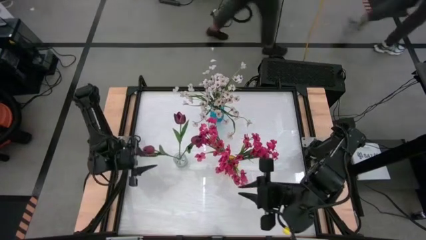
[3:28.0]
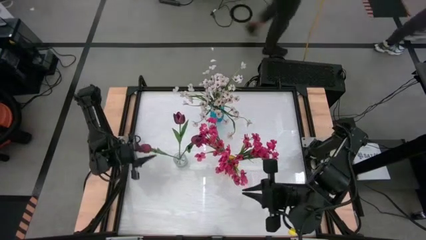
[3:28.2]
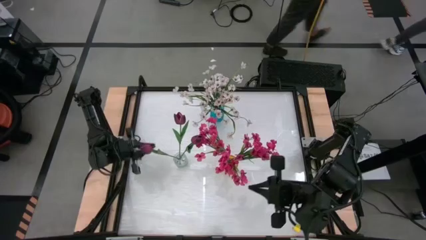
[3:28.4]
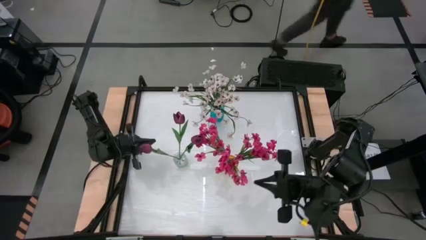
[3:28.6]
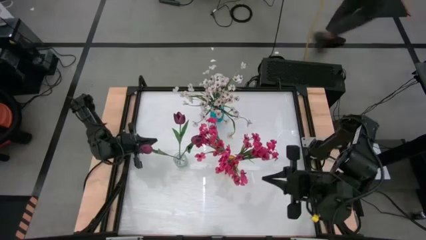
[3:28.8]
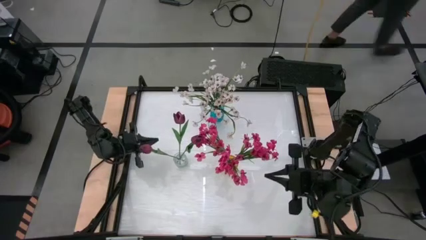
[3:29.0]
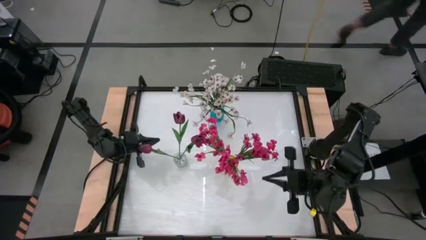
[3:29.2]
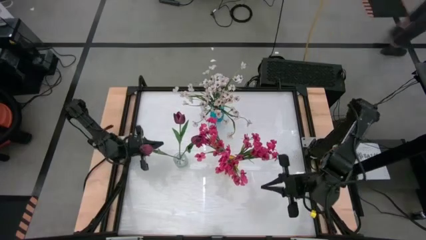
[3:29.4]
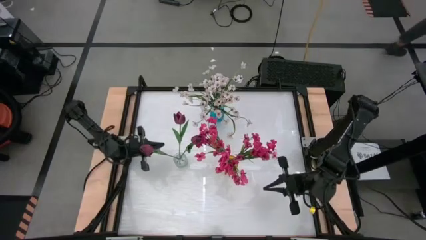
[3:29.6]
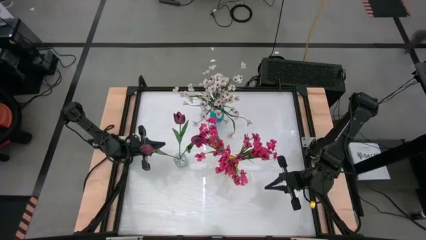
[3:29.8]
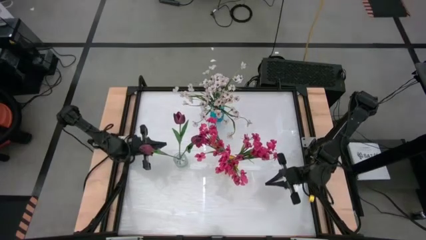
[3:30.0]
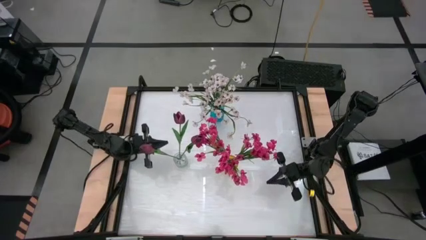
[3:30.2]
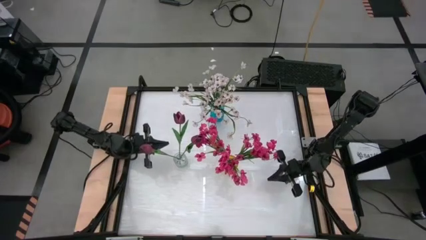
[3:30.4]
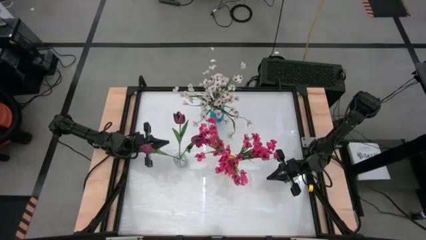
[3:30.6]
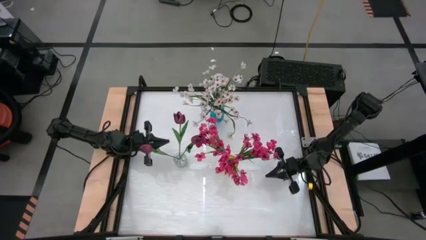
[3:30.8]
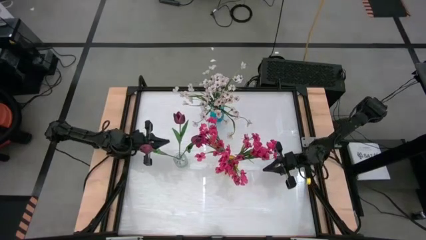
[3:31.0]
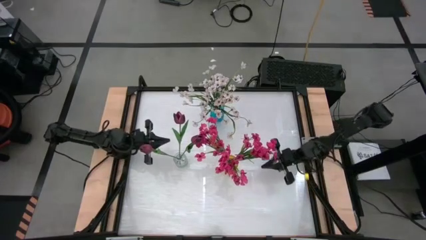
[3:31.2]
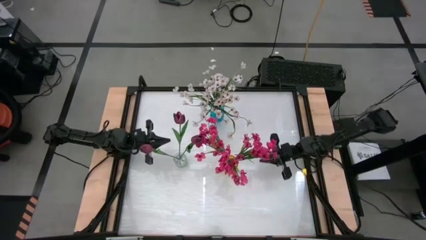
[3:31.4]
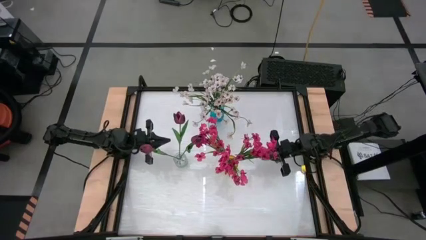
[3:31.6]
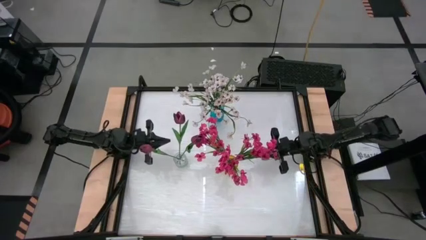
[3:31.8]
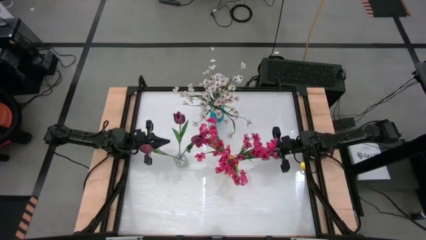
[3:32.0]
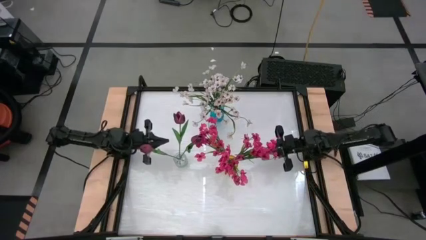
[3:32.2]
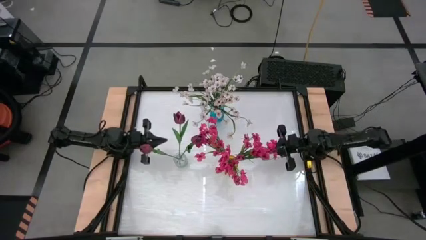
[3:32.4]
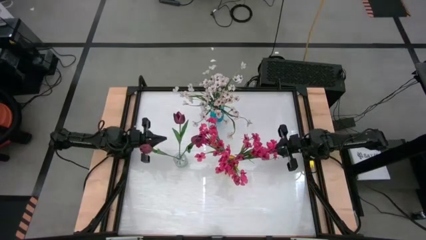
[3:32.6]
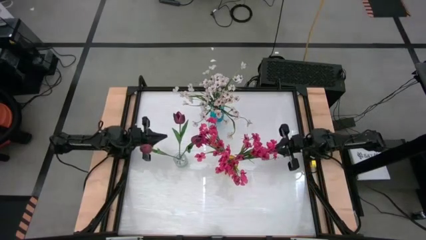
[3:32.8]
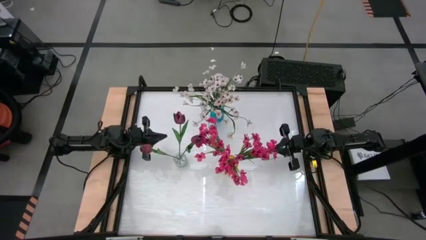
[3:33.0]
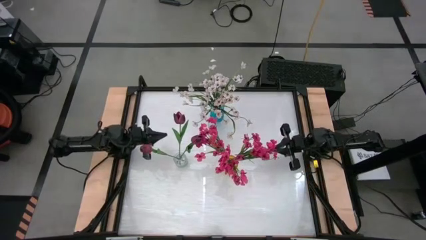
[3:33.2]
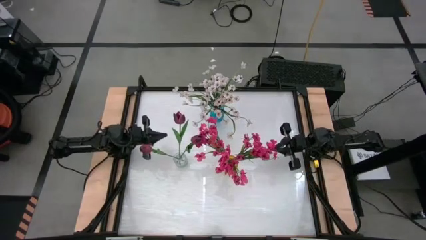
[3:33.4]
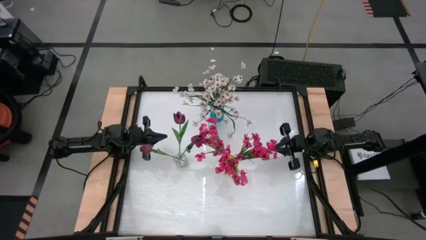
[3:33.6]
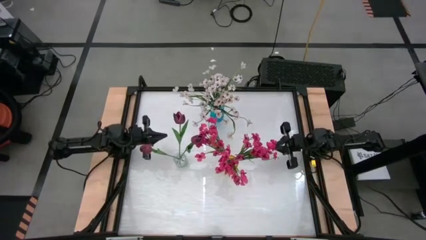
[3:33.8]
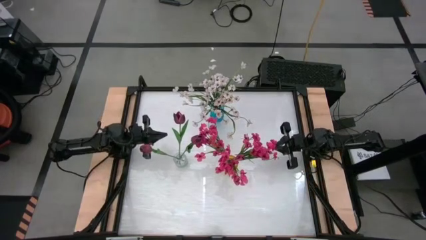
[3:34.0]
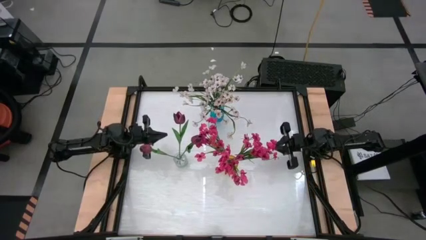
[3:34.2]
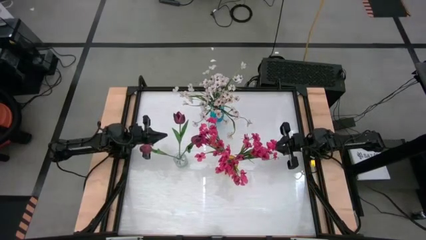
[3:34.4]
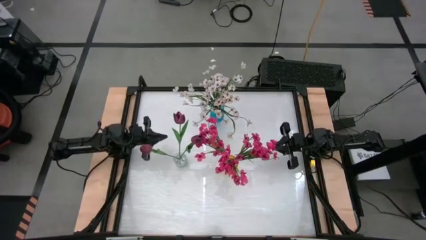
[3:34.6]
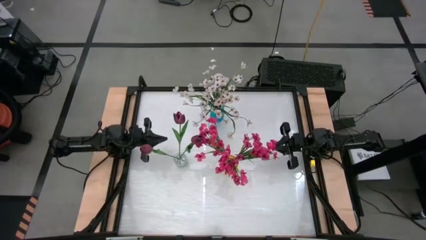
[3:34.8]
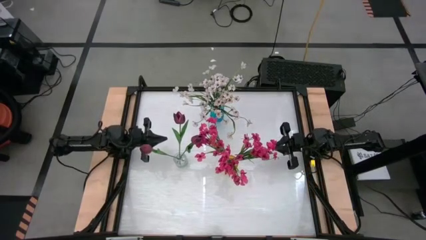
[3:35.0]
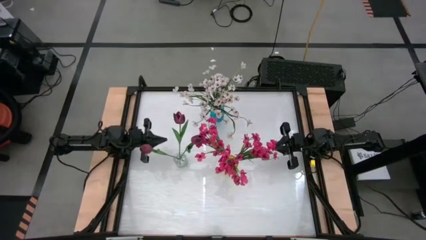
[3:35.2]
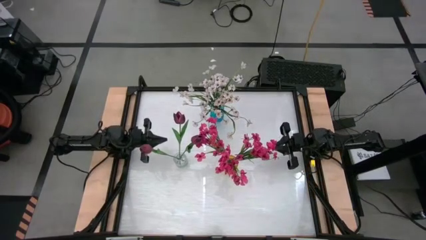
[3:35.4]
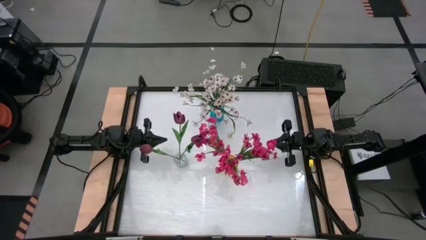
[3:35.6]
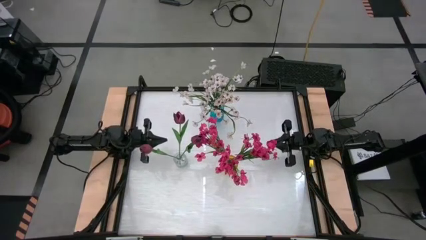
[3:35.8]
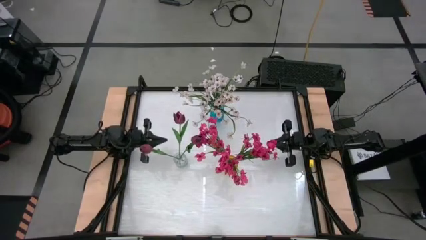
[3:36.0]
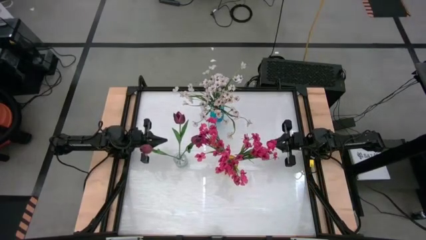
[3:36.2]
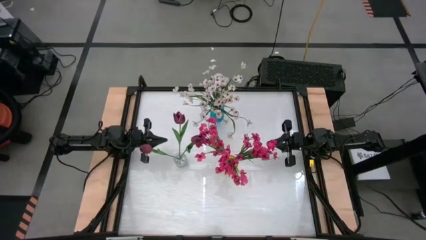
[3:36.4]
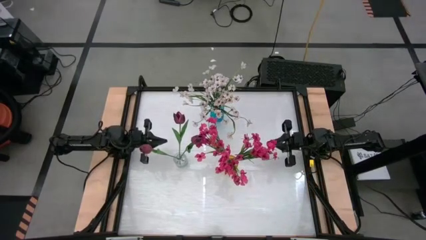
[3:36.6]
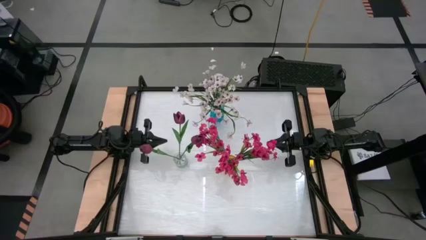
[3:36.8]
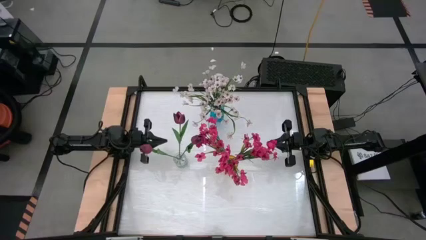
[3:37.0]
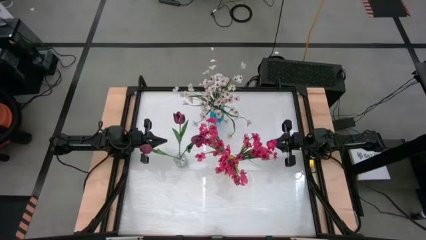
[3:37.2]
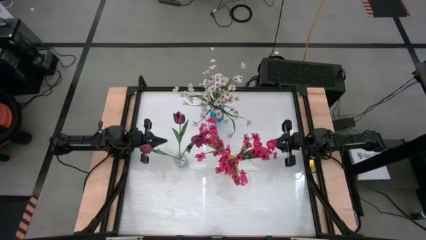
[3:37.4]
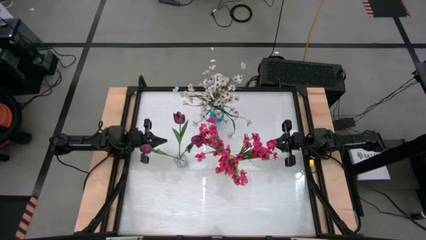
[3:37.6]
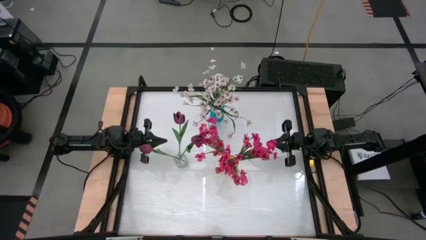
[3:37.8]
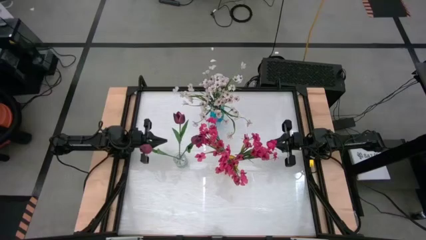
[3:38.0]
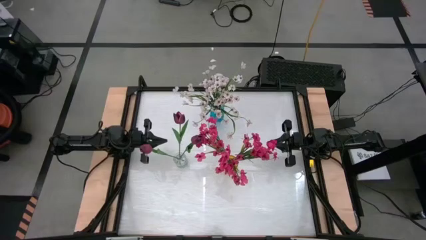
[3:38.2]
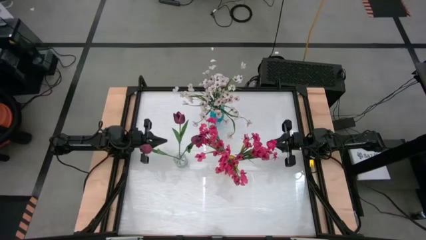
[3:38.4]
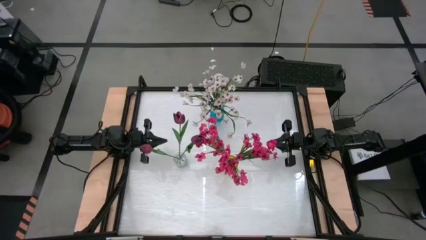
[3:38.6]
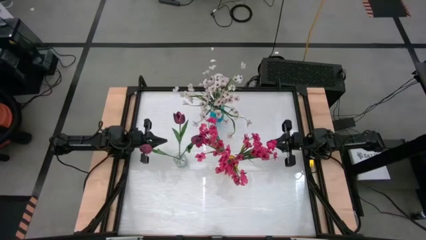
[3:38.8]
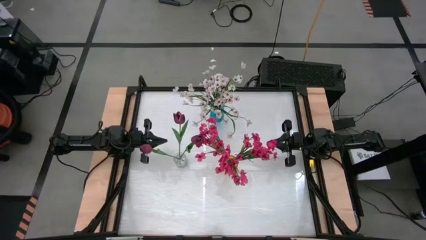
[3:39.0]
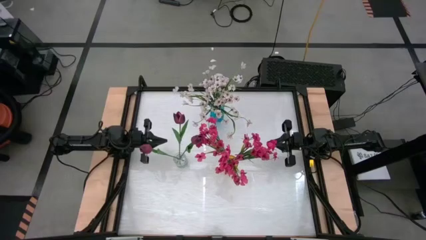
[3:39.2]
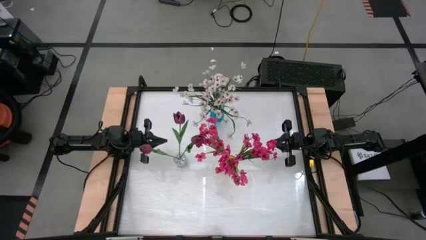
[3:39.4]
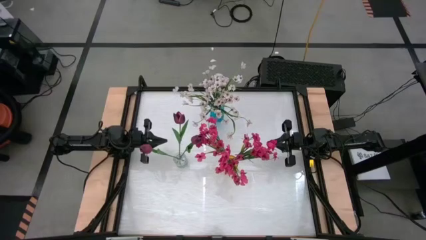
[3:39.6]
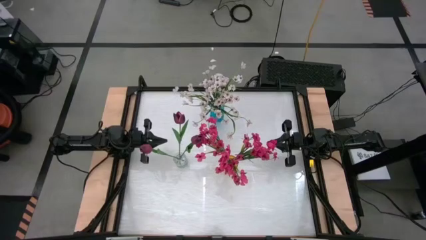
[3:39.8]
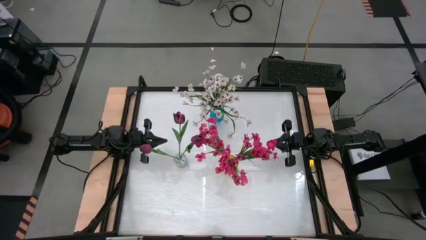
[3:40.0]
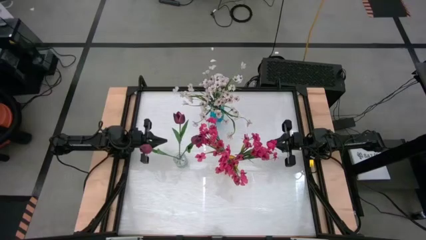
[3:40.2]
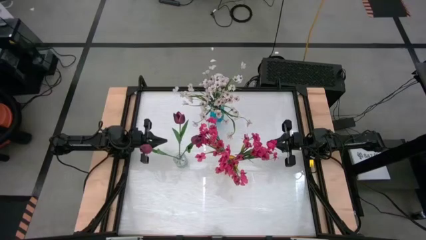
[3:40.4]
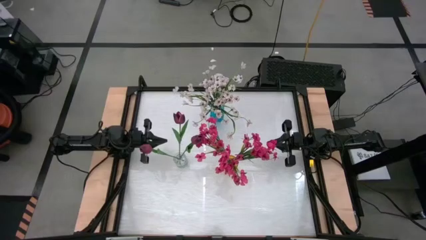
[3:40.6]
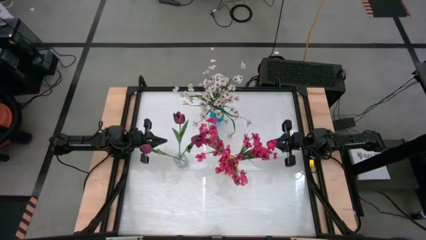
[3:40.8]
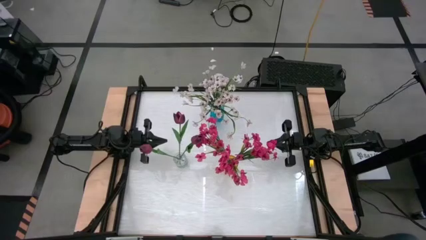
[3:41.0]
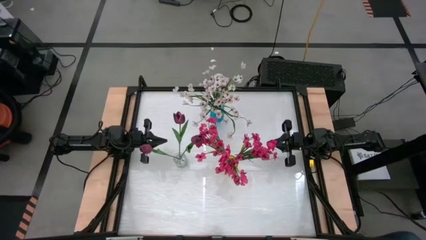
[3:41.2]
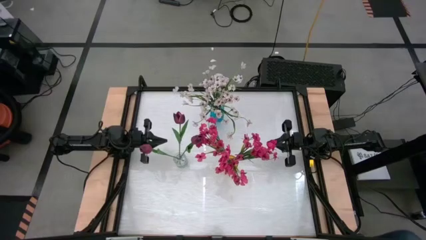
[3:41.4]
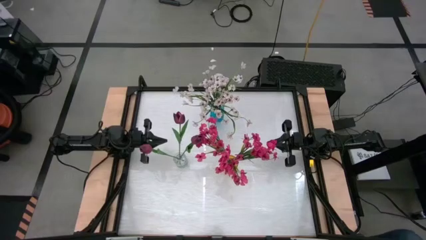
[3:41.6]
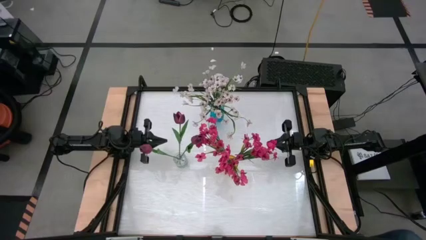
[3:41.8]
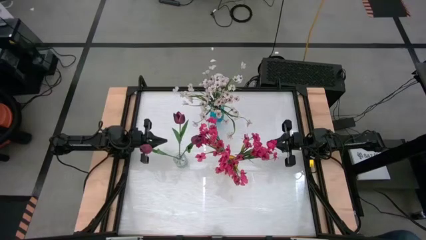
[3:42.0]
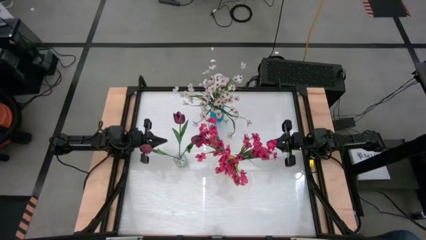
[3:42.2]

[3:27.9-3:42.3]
Task: Sort flowers into vase by color
Return to Home Position
